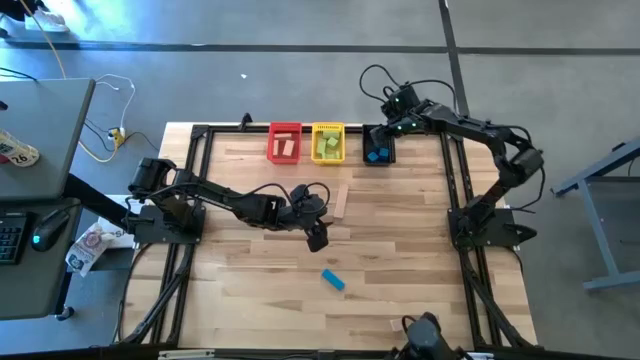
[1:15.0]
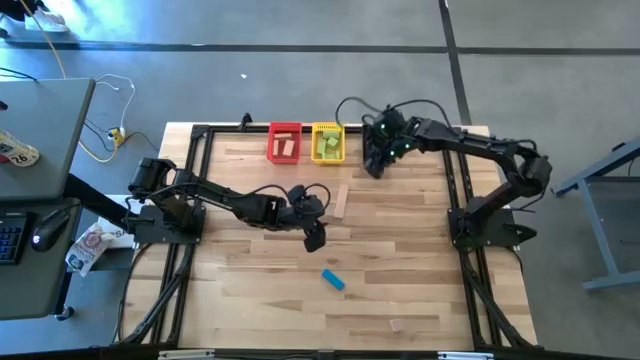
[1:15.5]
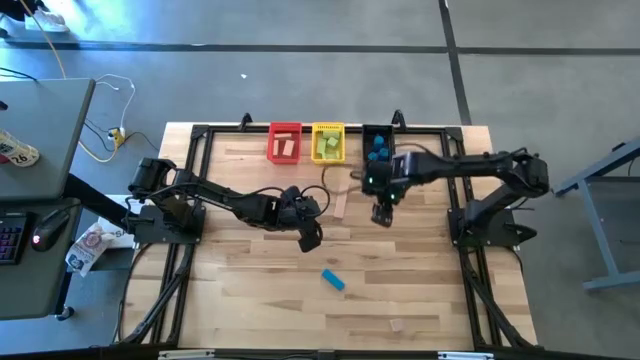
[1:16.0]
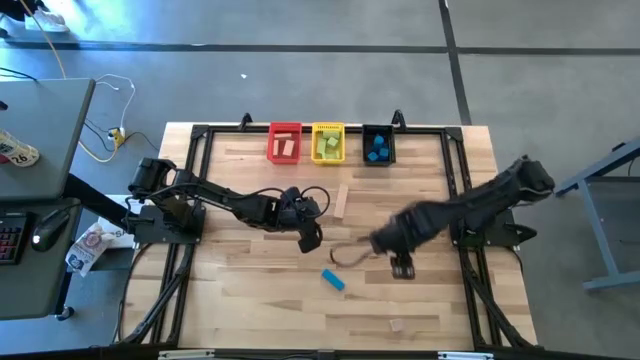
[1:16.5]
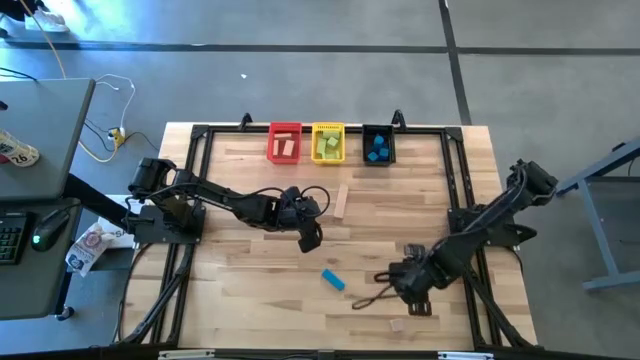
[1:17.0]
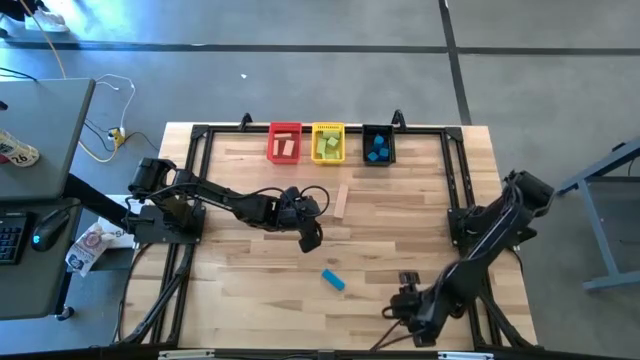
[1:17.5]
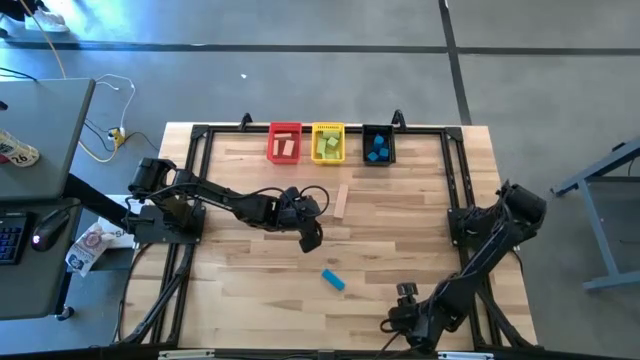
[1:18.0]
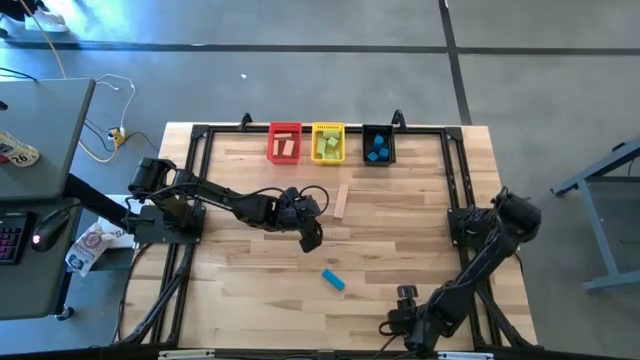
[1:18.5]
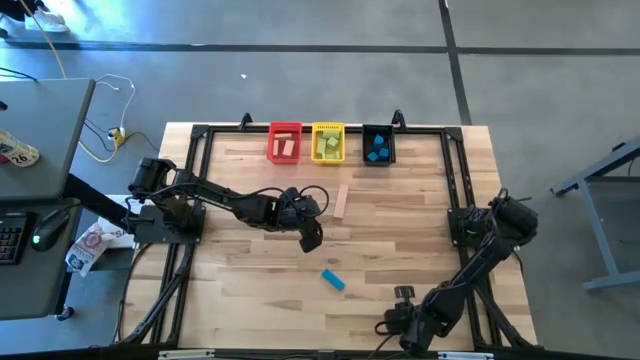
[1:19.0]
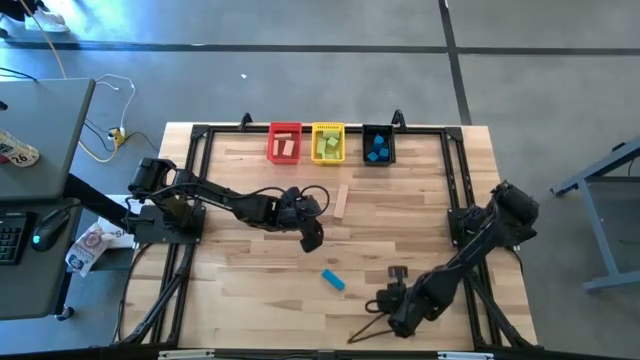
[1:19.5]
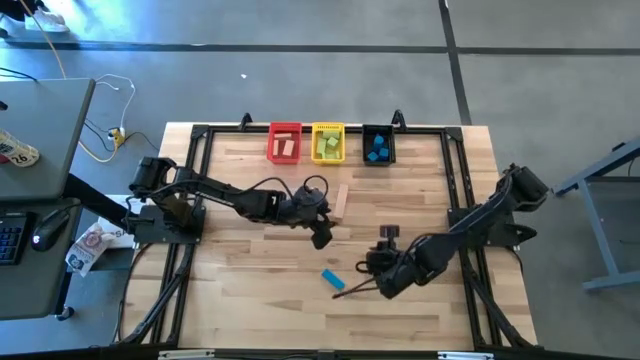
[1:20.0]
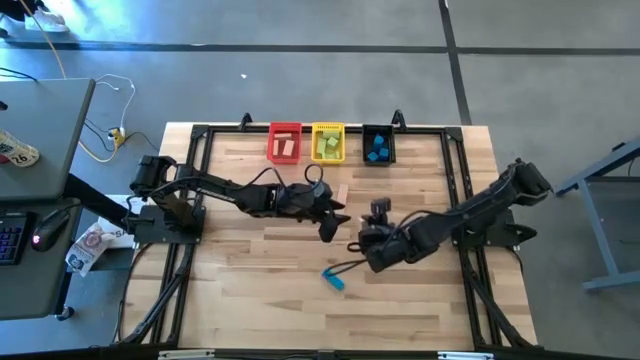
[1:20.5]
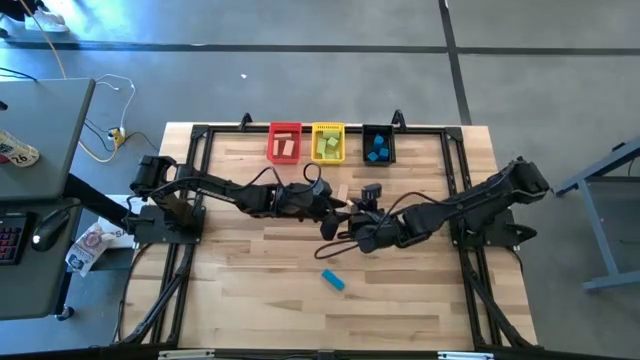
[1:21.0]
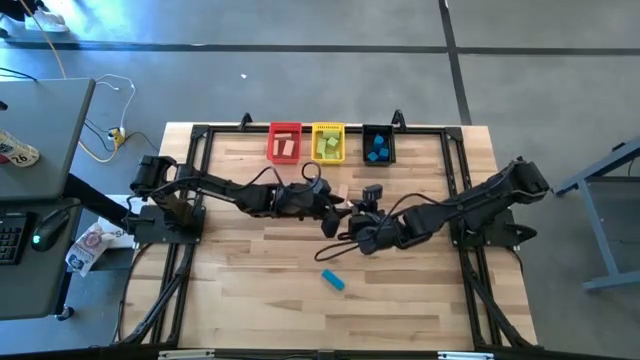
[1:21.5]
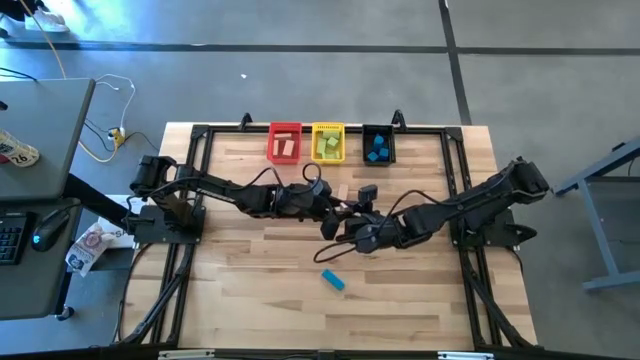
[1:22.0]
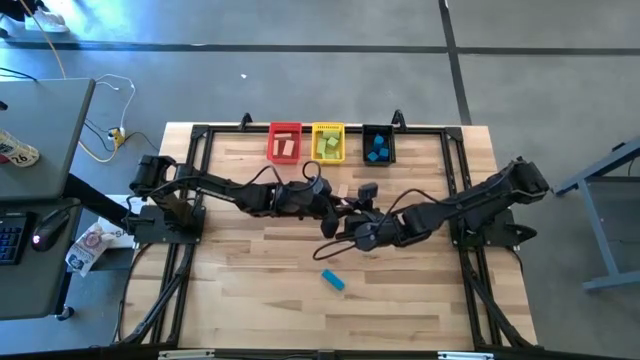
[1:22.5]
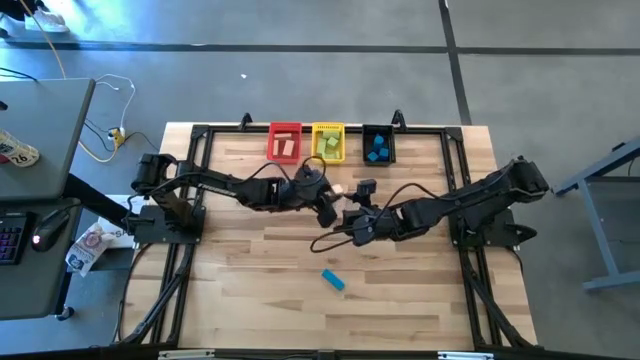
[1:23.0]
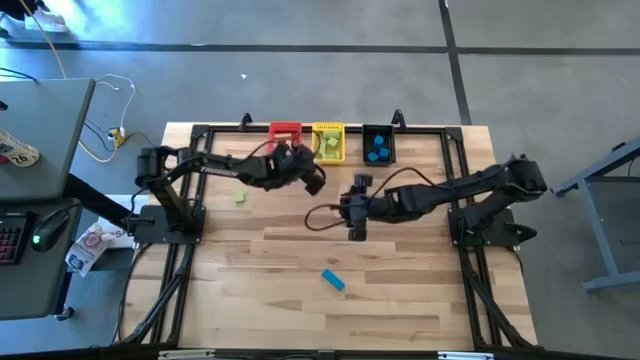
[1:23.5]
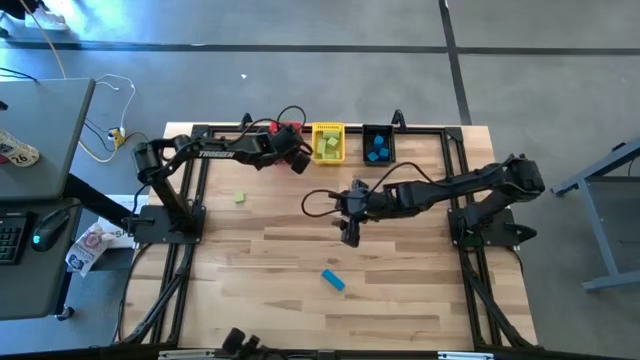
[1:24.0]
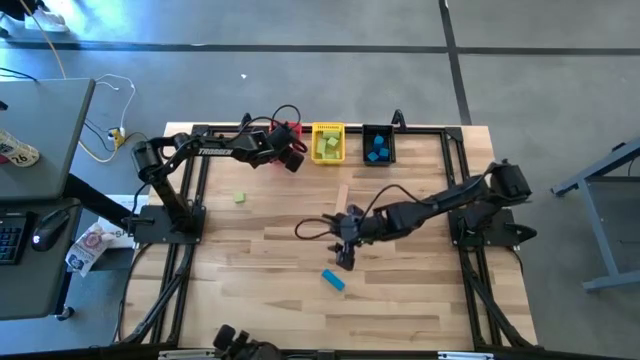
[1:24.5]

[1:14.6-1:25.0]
Task: Sort & place blocks by color
Put the brown block into the red basket

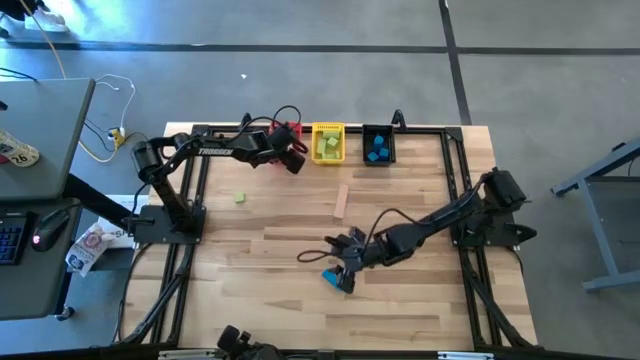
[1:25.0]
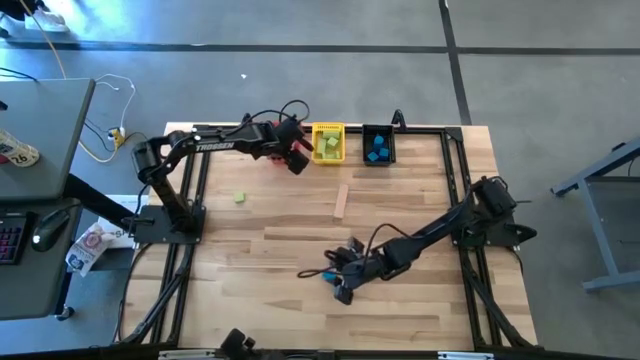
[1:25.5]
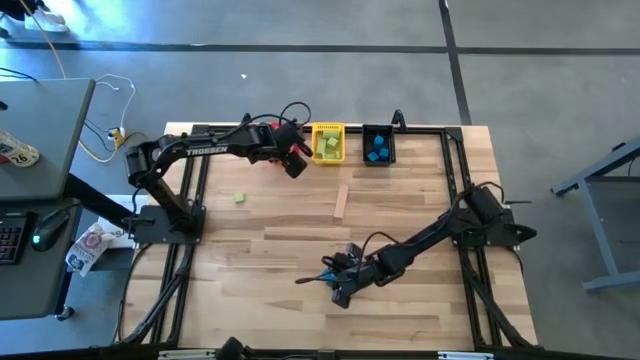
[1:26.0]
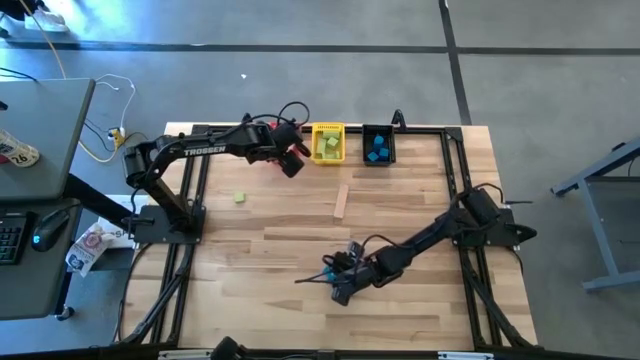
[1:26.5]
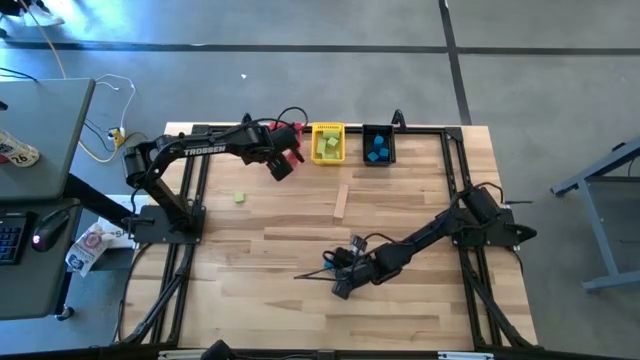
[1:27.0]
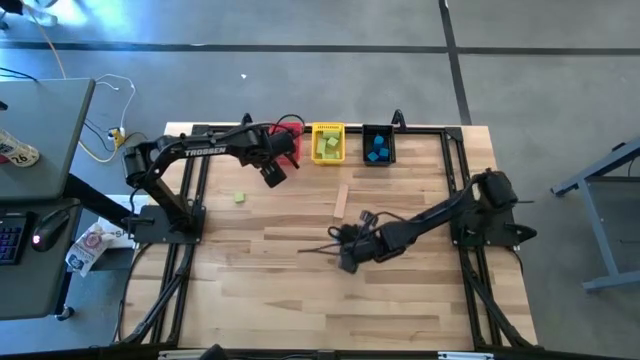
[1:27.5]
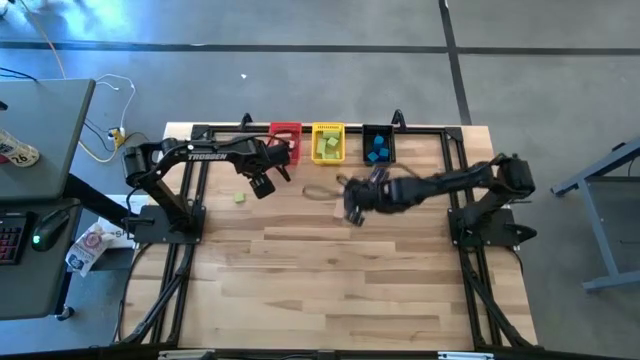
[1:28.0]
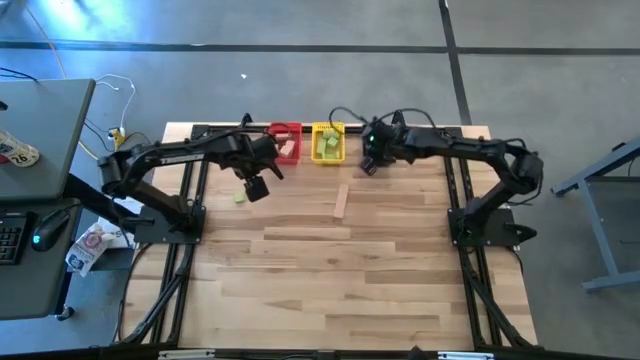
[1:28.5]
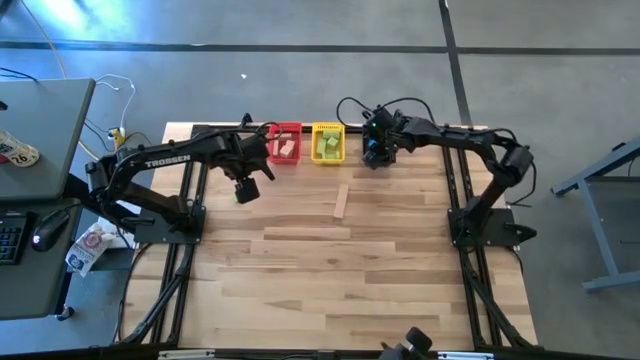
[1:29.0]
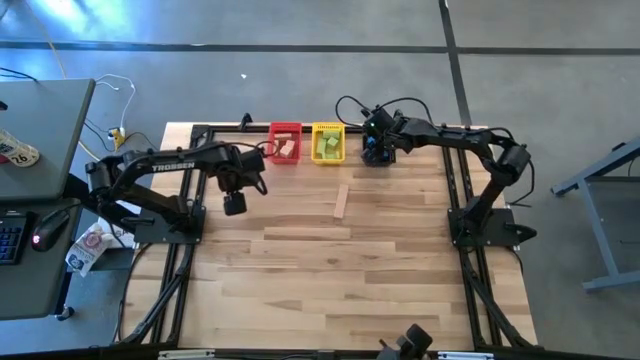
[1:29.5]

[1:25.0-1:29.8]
Put the blue block into the black basket

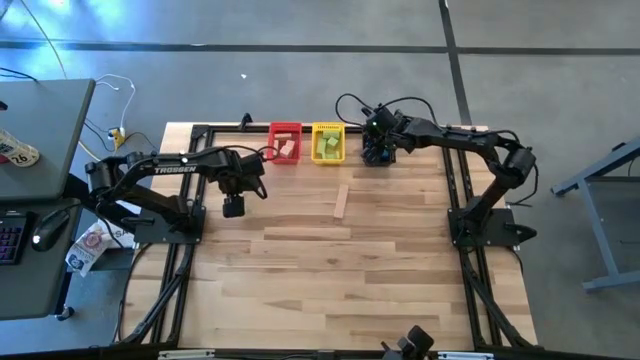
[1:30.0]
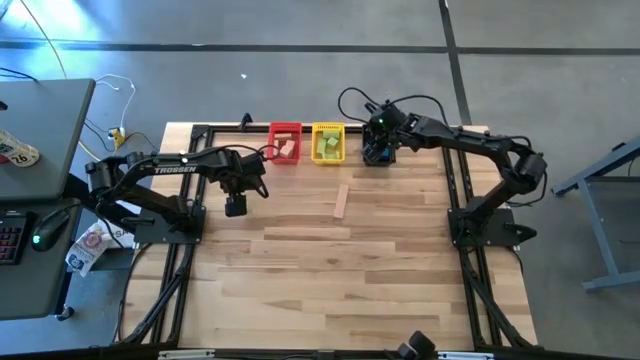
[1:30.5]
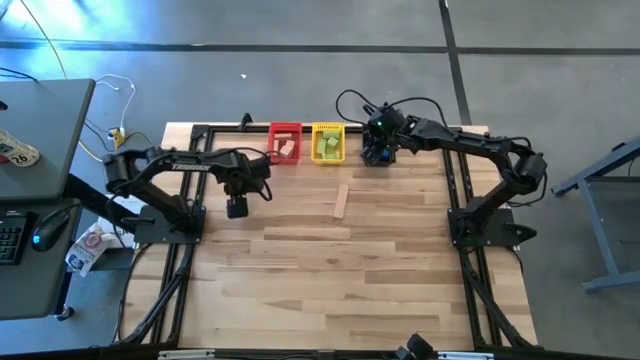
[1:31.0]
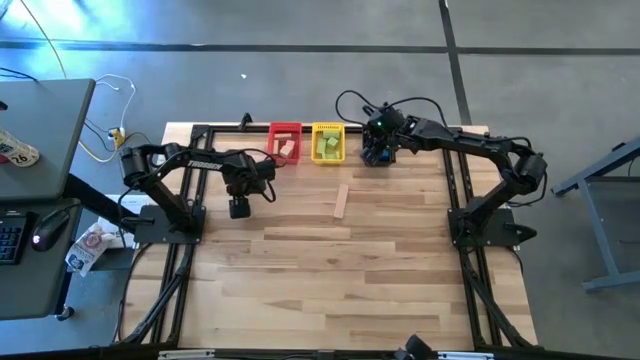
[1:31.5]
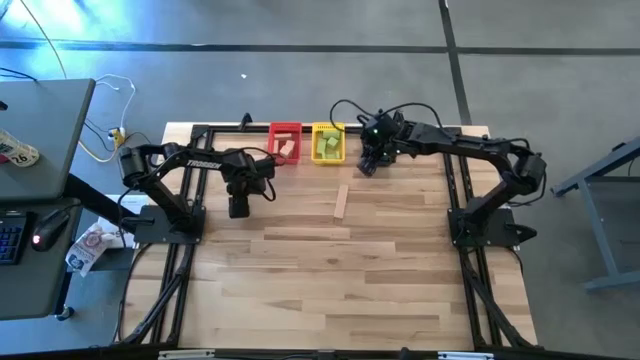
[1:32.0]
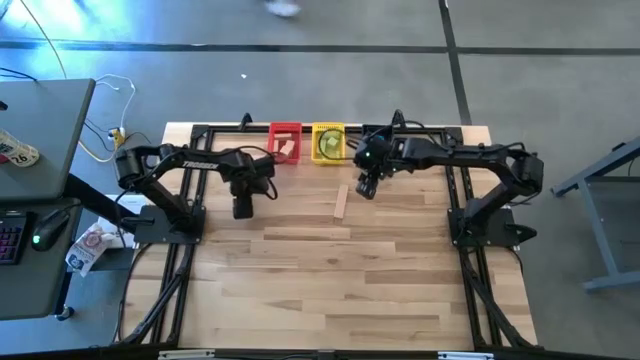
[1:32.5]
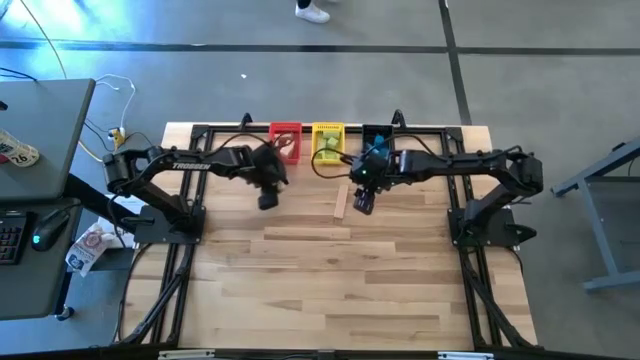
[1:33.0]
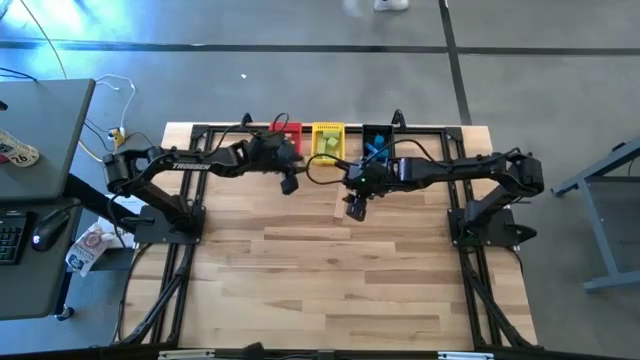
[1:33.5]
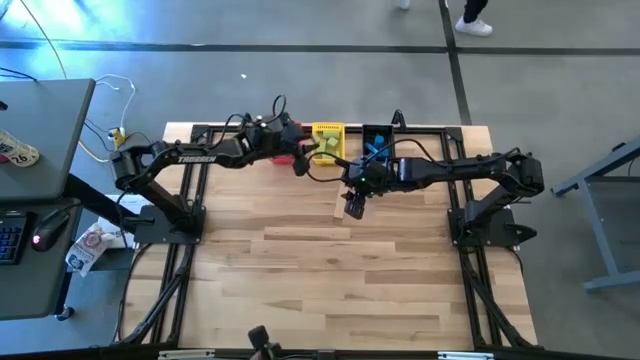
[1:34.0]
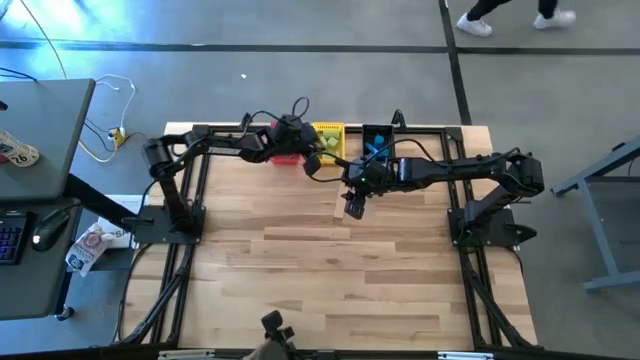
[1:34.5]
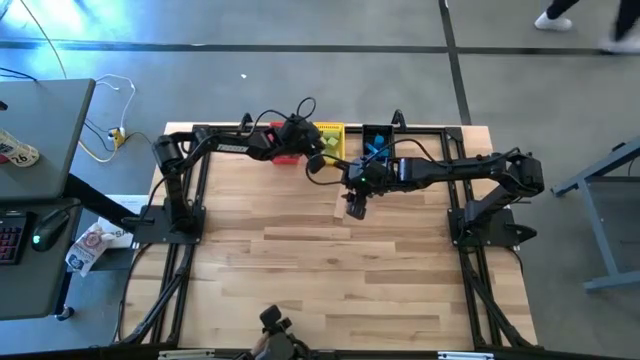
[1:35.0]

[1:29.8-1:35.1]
Put the green block into the yellow basket

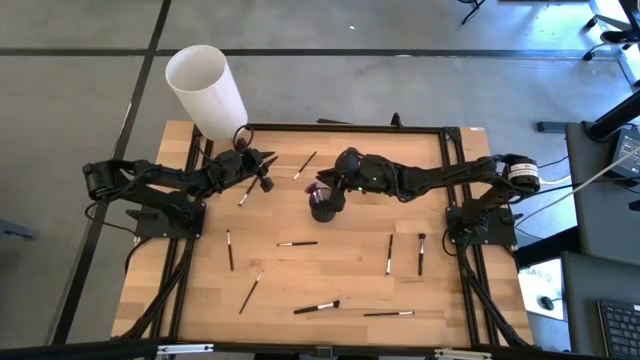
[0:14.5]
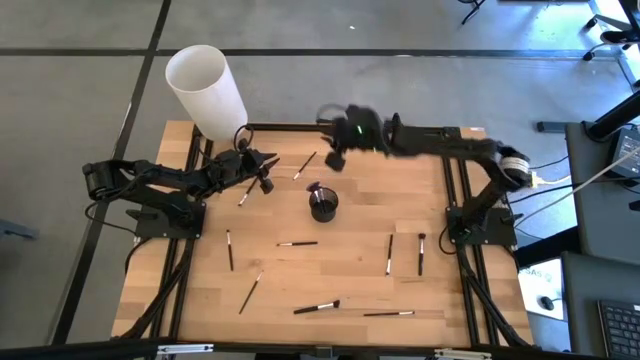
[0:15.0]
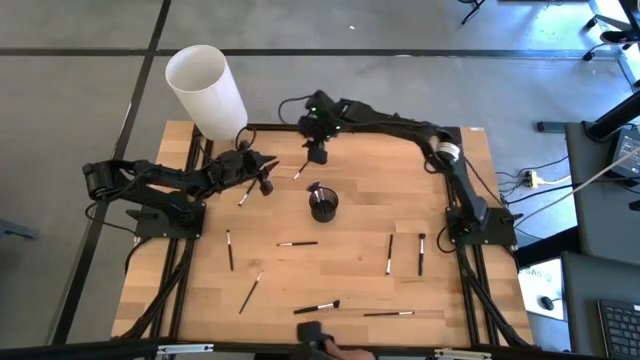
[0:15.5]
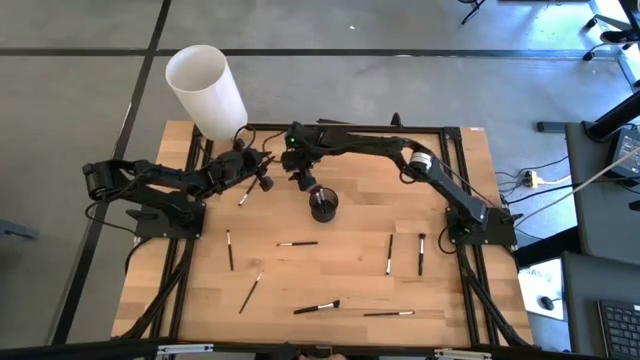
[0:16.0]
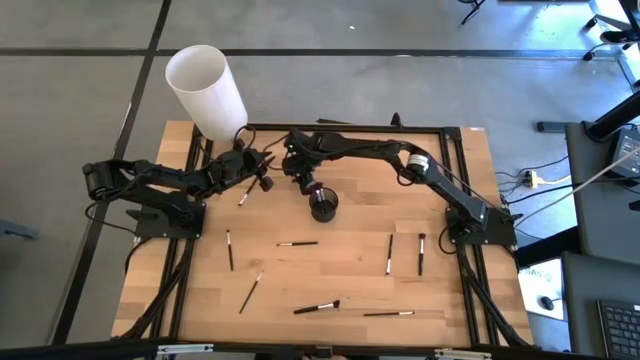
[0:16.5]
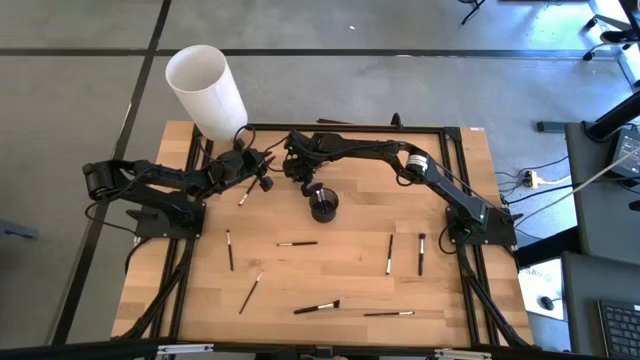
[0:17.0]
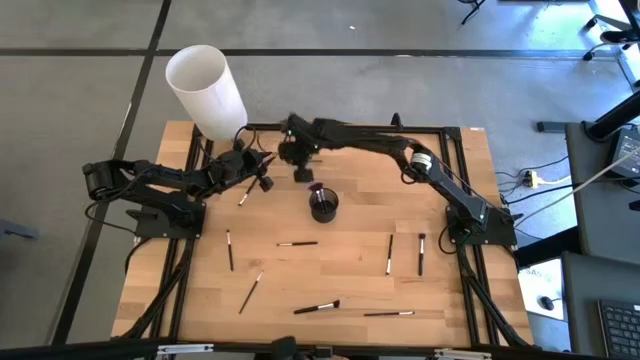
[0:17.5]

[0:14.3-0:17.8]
Task: Pick & Place Makeup Brushes
Put the eyeshadow brush into the makeup brush holder
